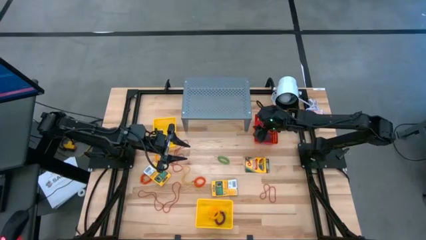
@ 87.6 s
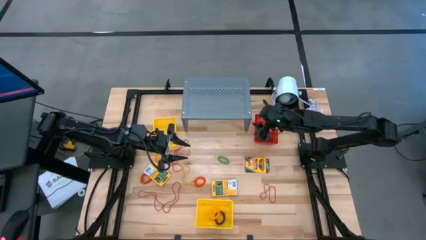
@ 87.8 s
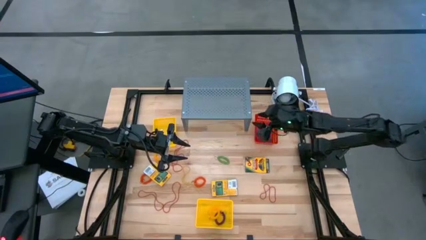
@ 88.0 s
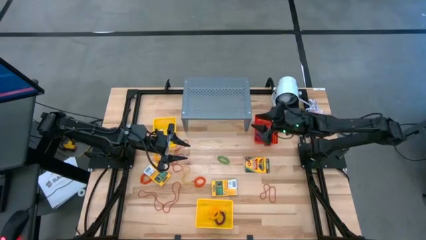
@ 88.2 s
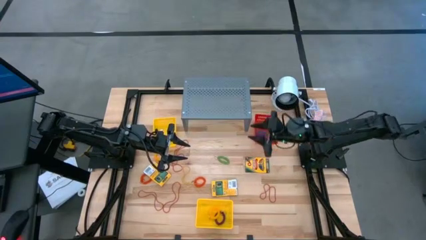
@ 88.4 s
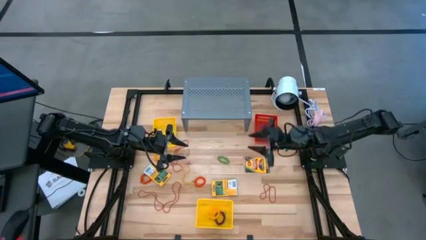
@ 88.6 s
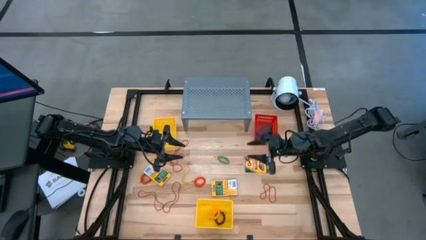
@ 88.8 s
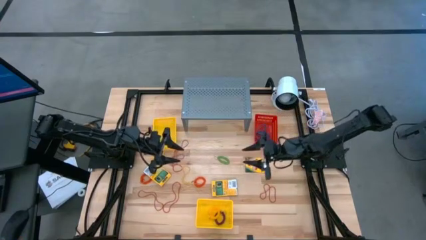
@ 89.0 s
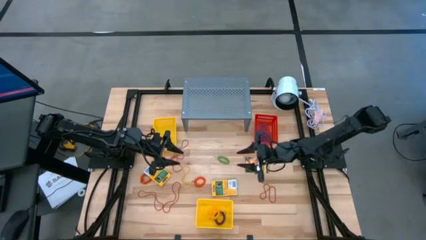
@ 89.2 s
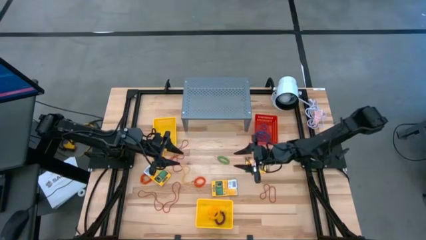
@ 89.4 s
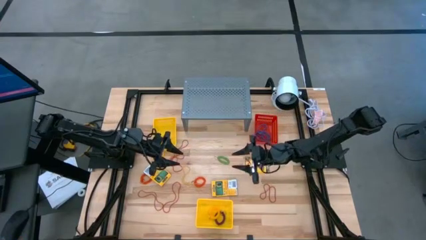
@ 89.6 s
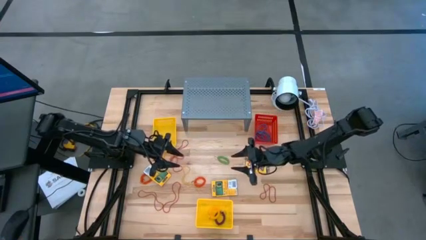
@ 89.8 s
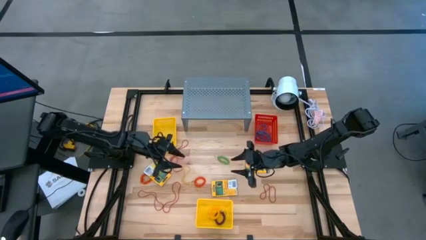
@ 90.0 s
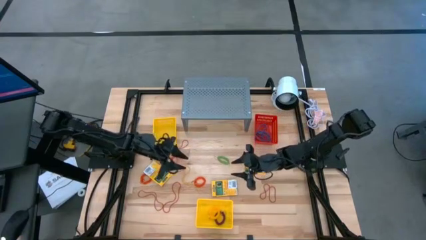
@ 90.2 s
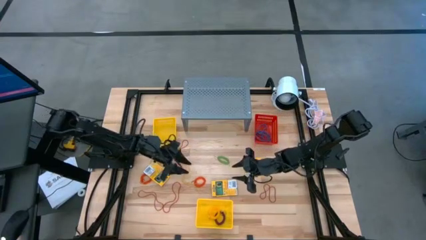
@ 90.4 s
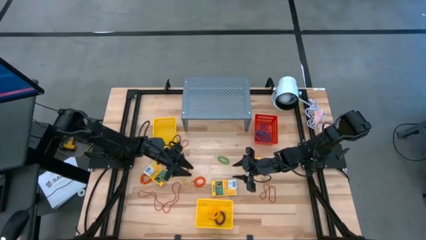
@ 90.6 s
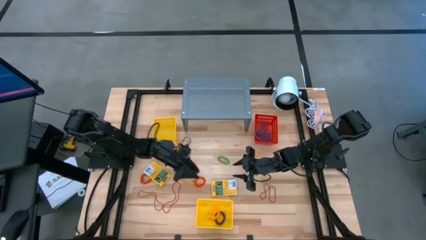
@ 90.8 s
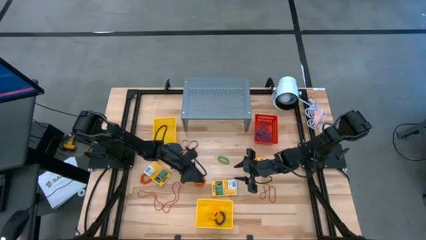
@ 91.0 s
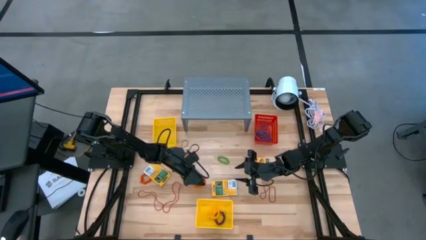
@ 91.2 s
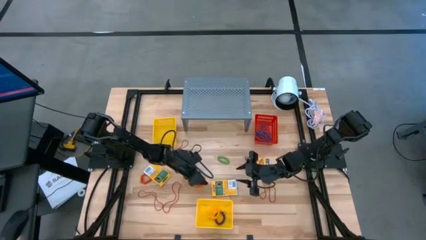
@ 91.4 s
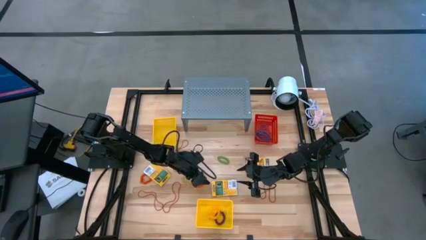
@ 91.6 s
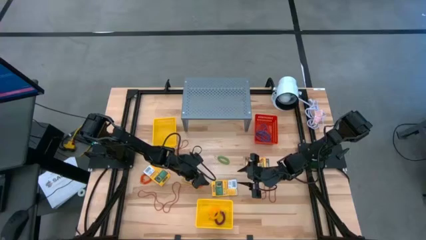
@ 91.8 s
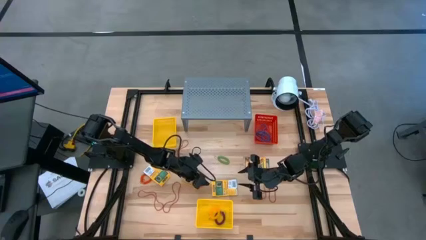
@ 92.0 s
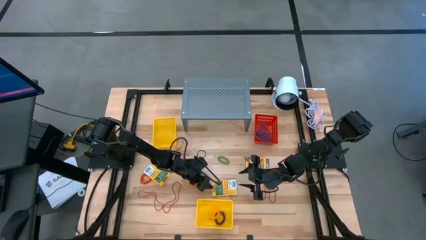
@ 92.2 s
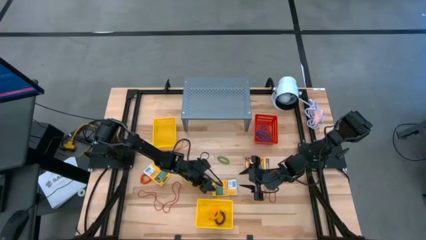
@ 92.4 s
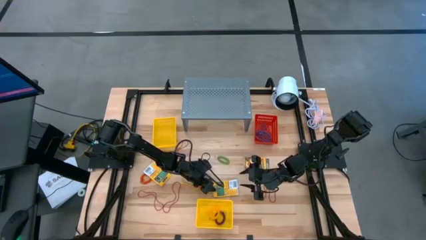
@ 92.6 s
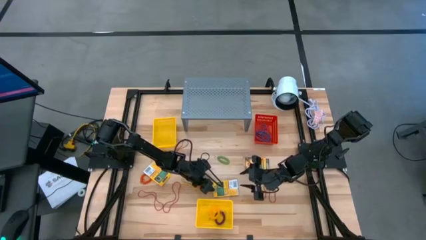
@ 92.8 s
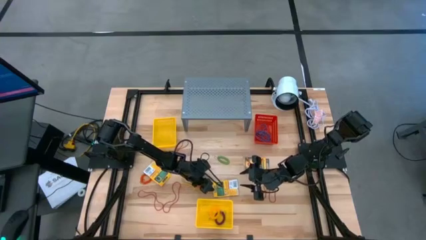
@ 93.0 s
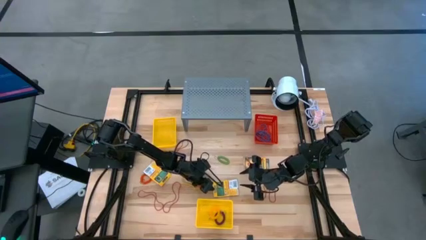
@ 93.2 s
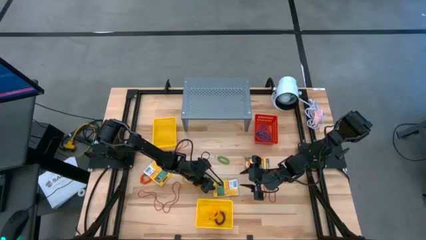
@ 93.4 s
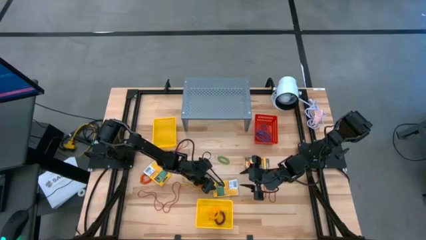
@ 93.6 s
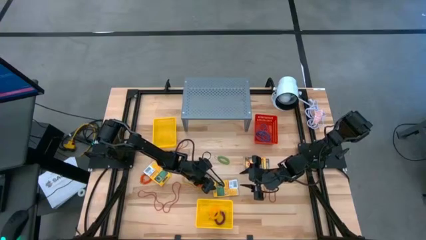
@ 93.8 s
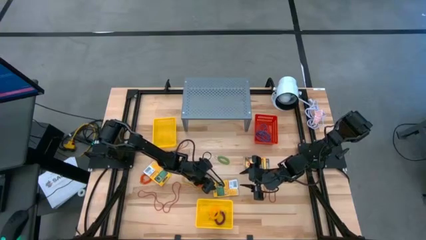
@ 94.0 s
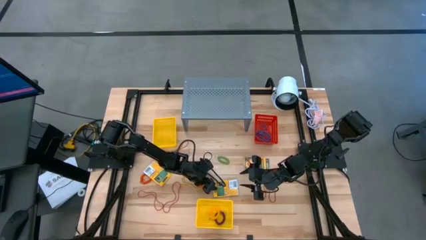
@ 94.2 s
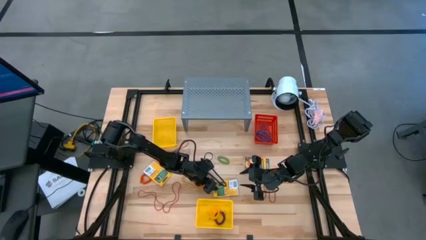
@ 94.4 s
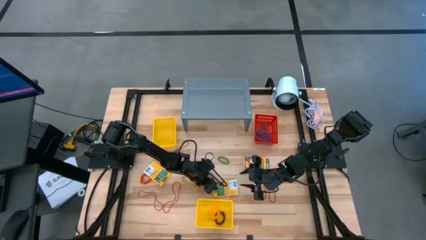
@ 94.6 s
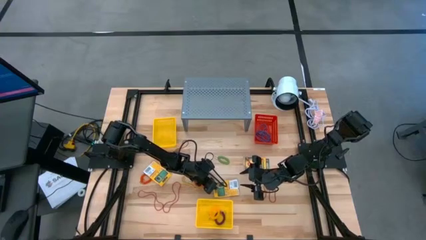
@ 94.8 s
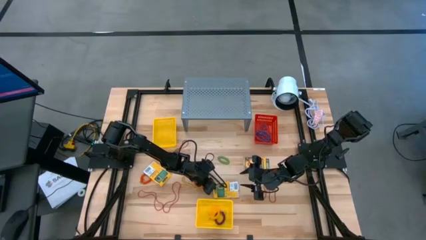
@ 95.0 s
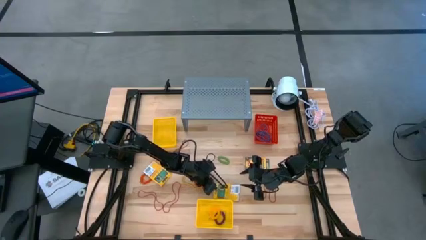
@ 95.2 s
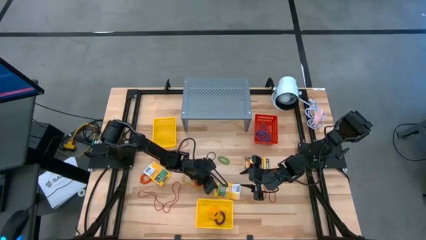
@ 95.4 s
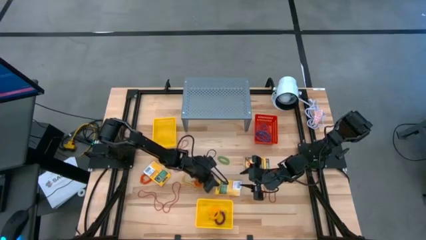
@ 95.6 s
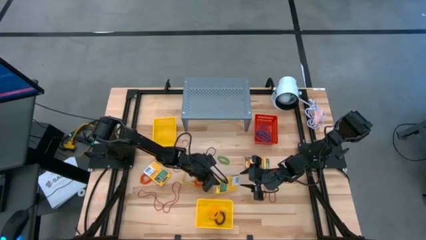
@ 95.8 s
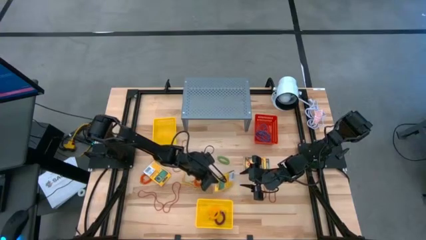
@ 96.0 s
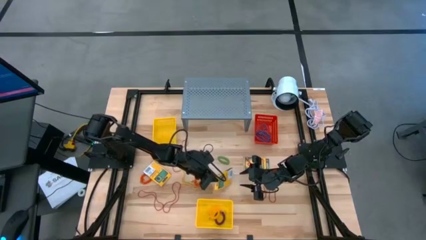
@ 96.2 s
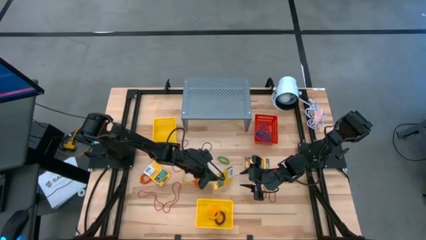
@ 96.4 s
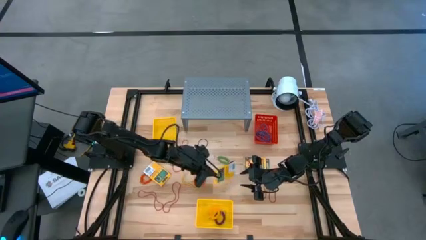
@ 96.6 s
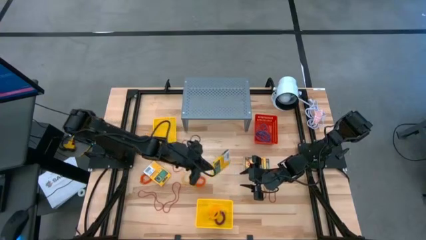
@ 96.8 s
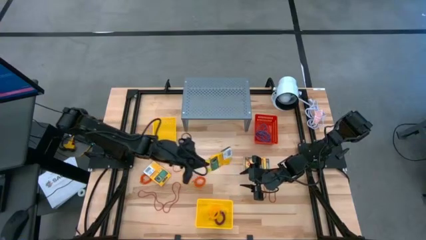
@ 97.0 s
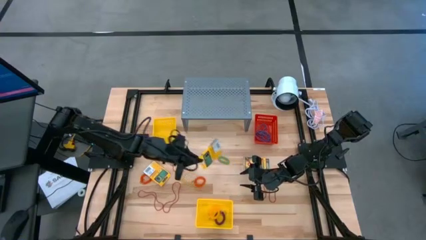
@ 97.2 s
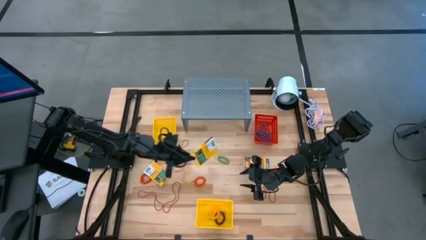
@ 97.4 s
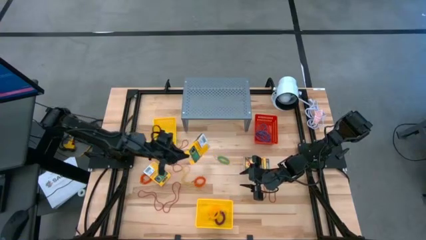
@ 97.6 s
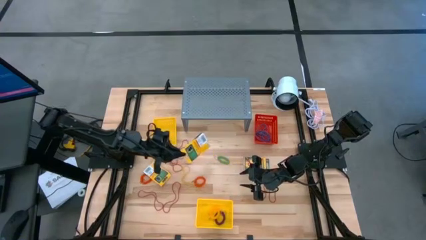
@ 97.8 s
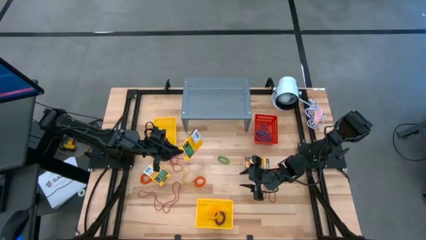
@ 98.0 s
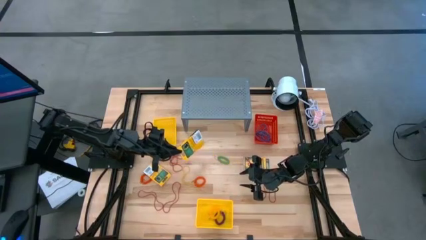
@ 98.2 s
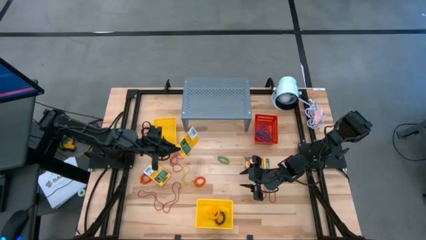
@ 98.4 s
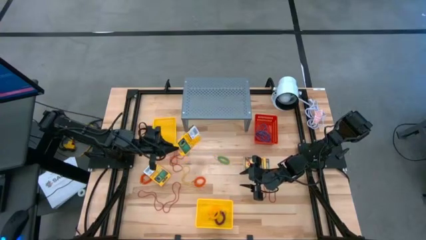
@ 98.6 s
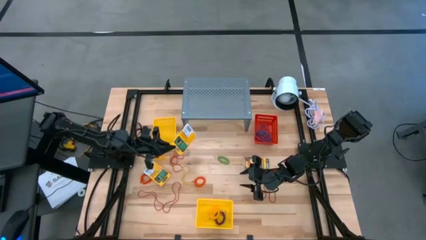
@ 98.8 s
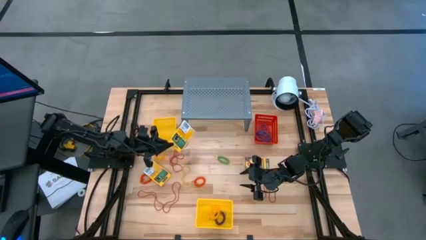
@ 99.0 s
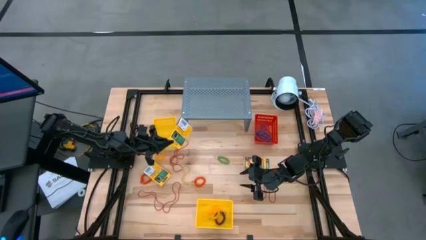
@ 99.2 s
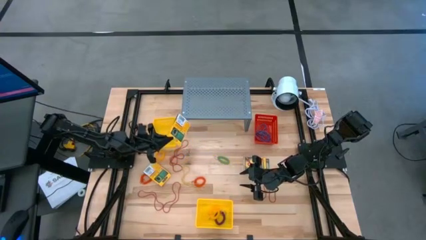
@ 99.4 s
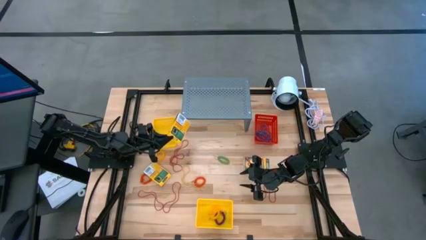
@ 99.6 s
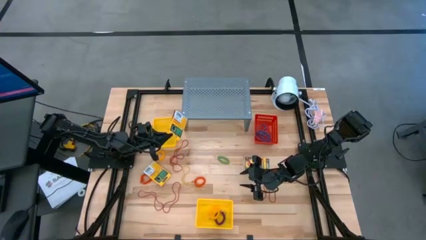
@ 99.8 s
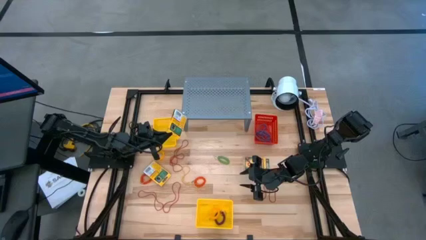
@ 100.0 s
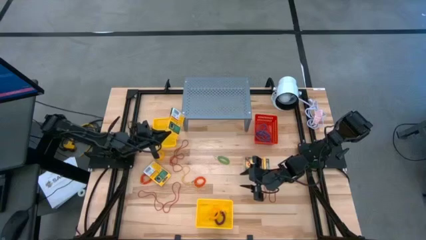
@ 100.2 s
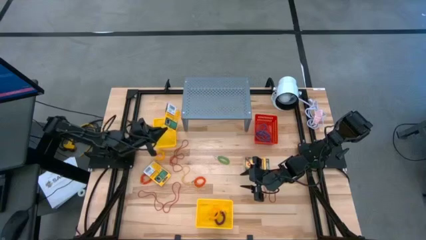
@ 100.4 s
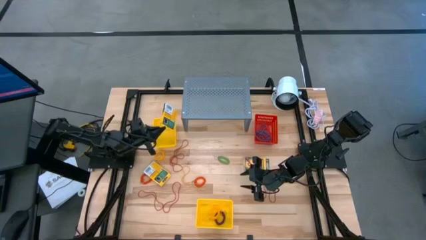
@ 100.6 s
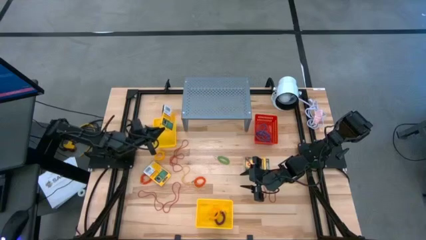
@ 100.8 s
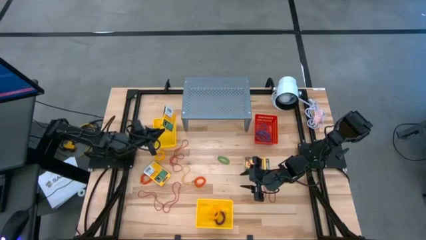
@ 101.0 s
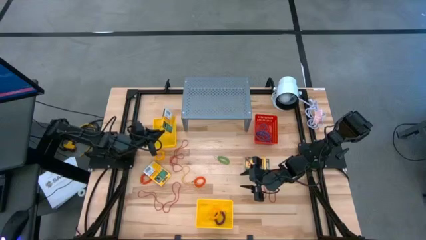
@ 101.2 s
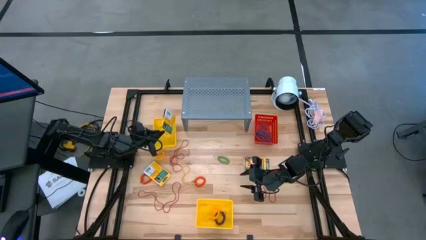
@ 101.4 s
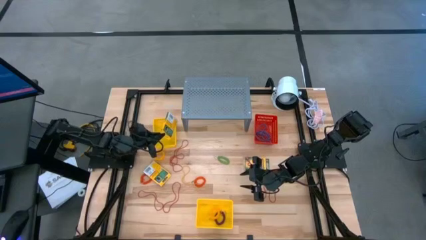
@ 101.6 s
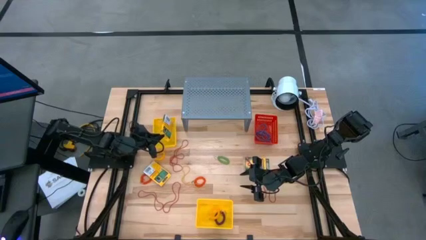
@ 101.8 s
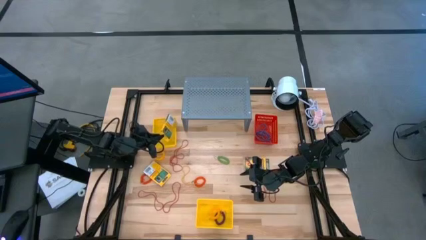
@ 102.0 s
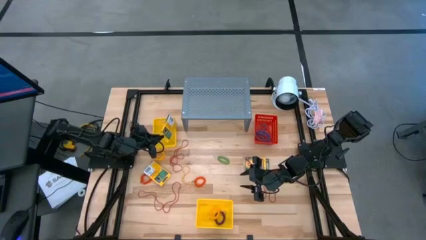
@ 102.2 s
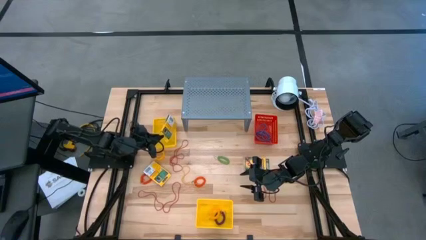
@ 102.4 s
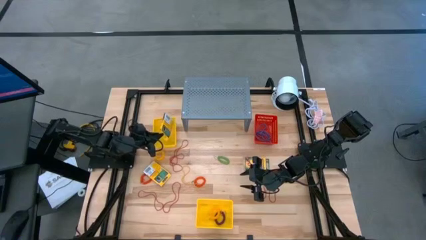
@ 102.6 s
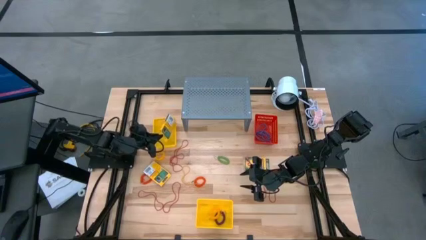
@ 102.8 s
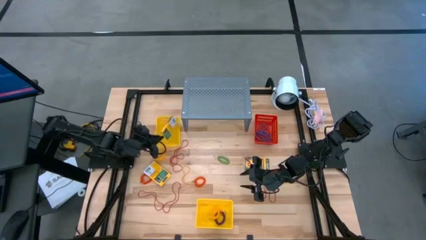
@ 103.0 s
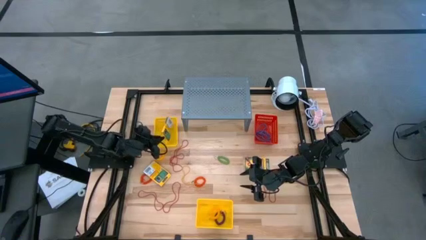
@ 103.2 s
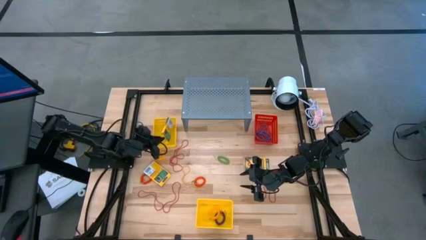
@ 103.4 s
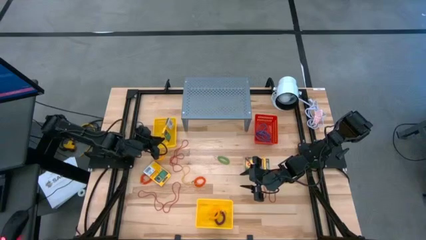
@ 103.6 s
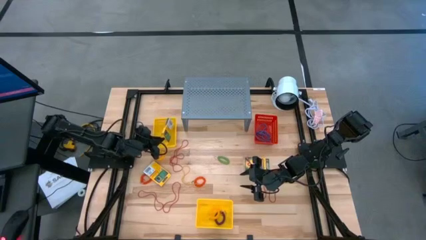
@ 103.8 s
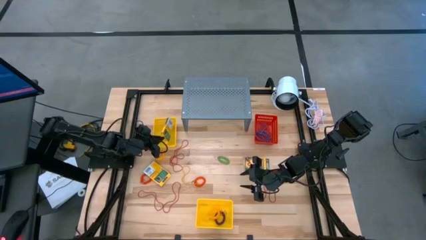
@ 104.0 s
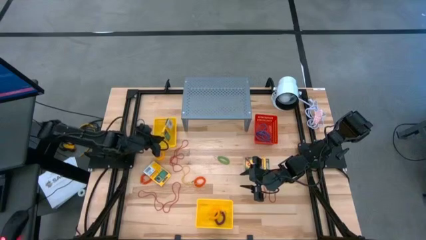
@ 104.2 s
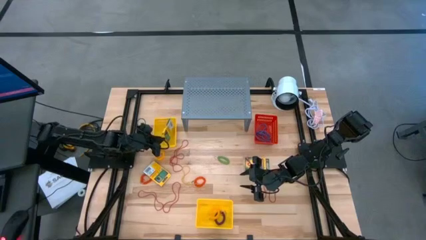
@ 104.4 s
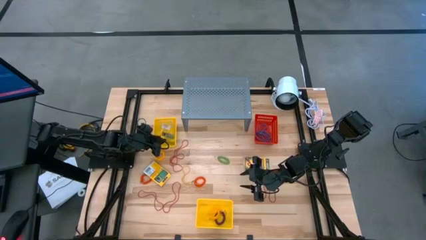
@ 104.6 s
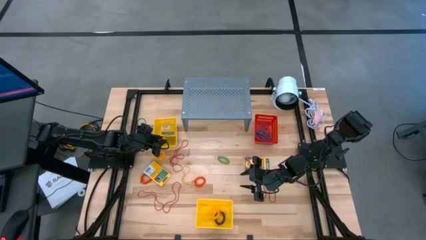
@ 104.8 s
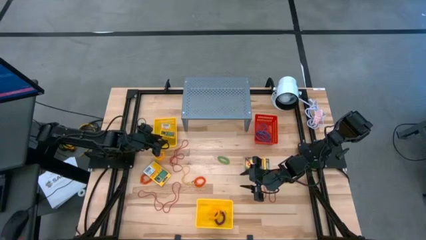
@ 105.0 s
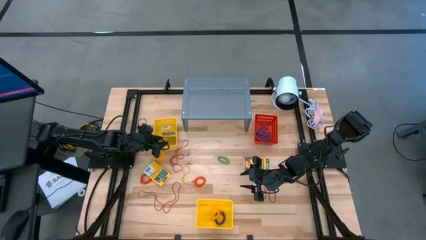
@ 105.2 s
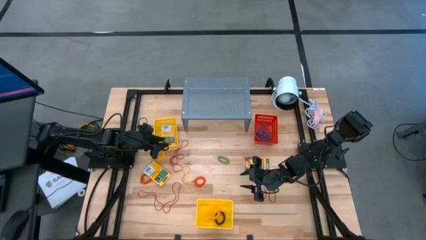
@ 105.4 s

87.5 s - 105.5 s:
Task: Pick & Place Office Desk Supplies
Put the yellow crayon box into the top yellow bin
